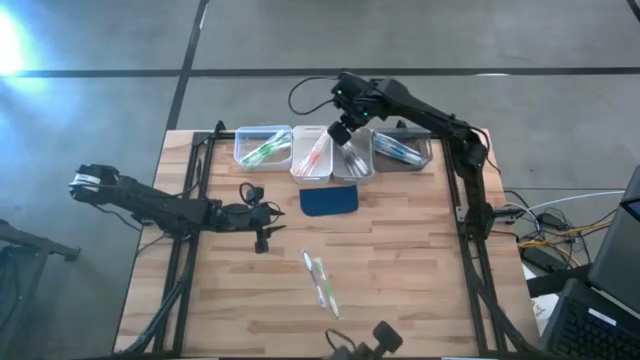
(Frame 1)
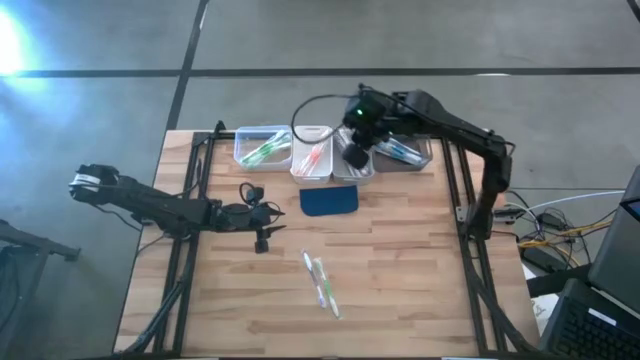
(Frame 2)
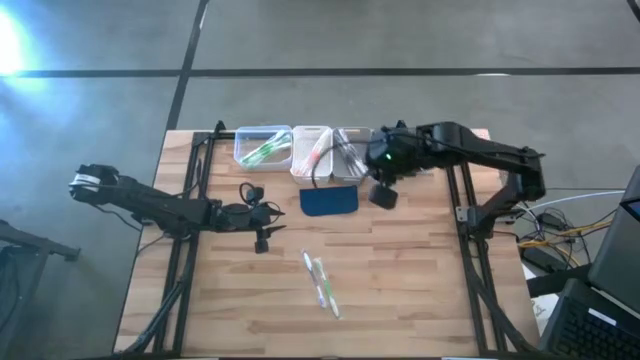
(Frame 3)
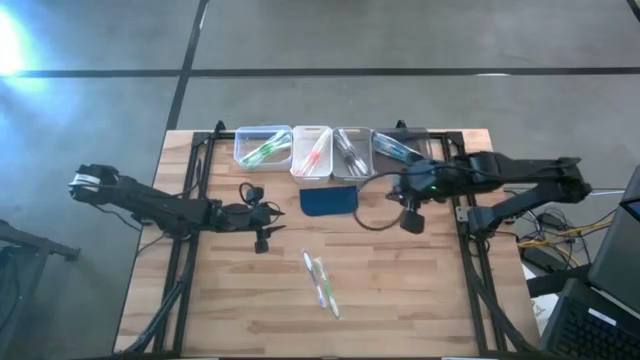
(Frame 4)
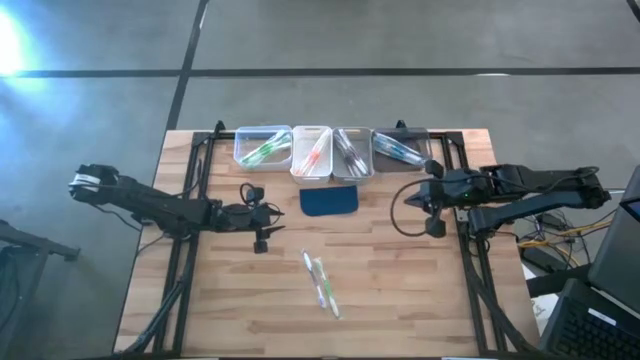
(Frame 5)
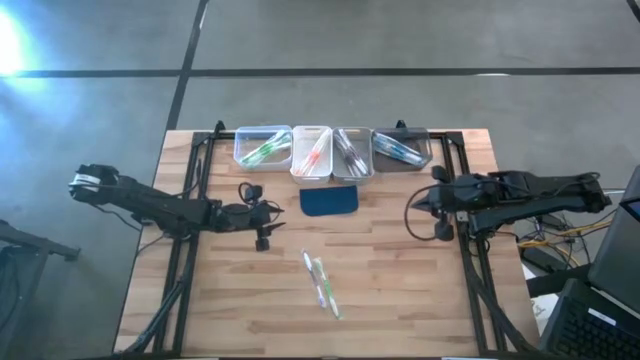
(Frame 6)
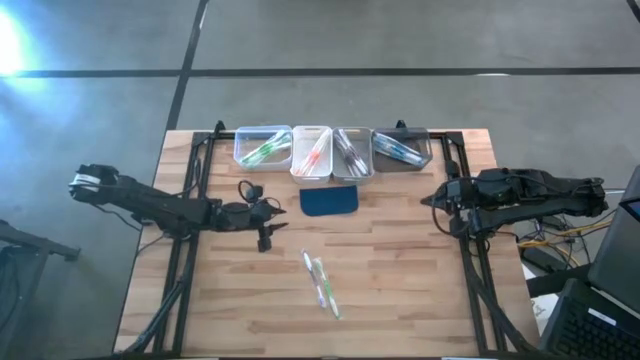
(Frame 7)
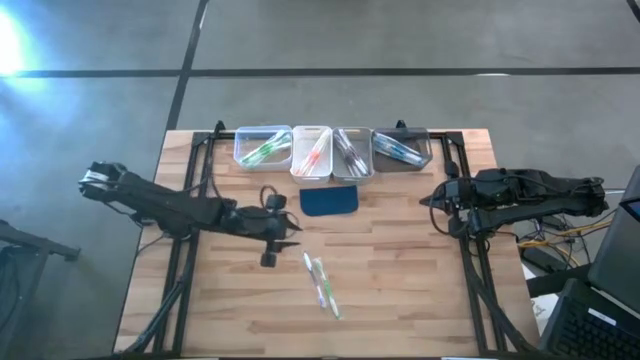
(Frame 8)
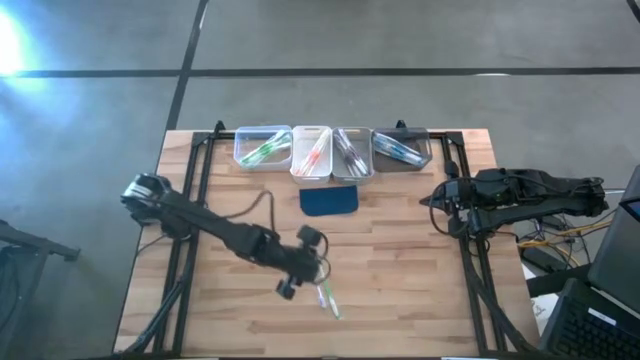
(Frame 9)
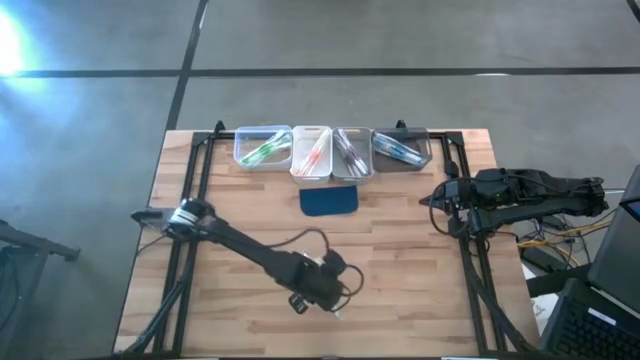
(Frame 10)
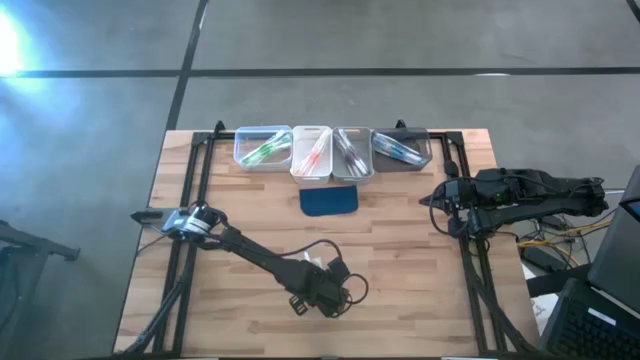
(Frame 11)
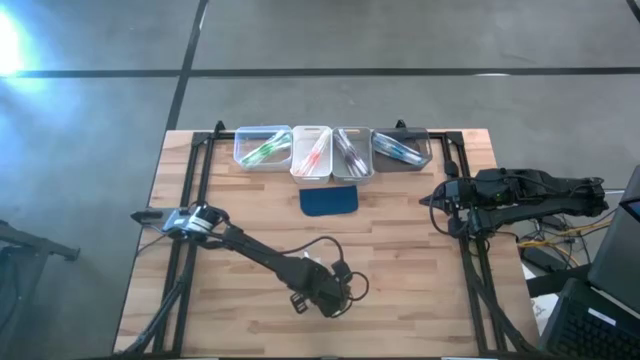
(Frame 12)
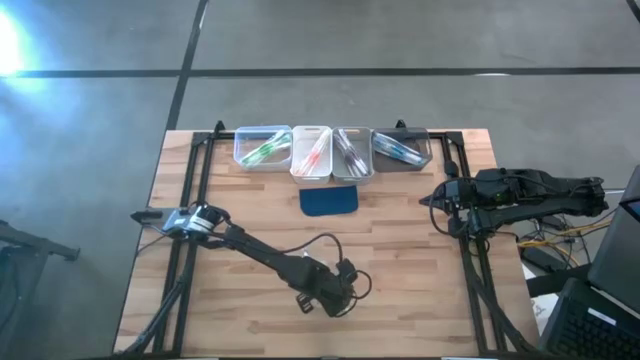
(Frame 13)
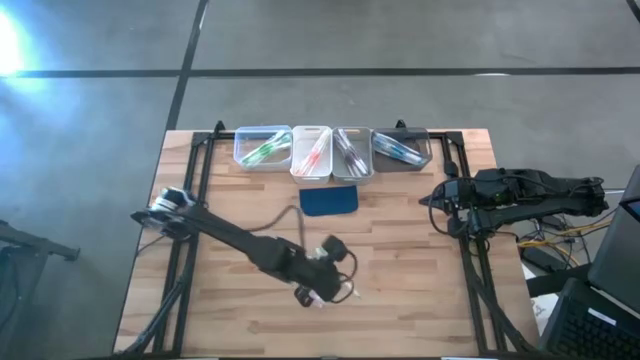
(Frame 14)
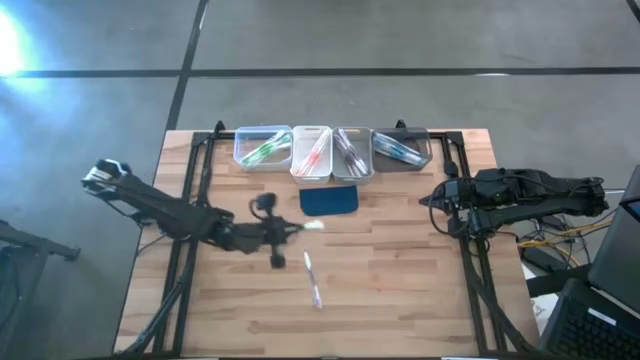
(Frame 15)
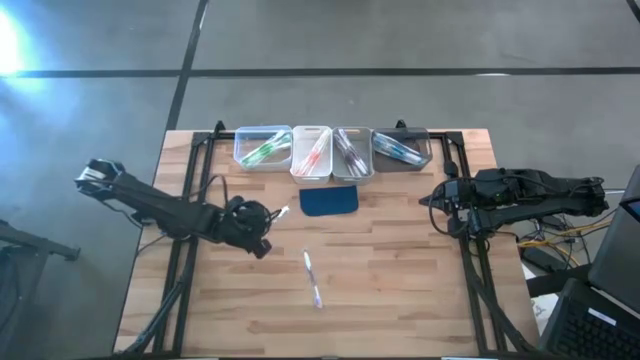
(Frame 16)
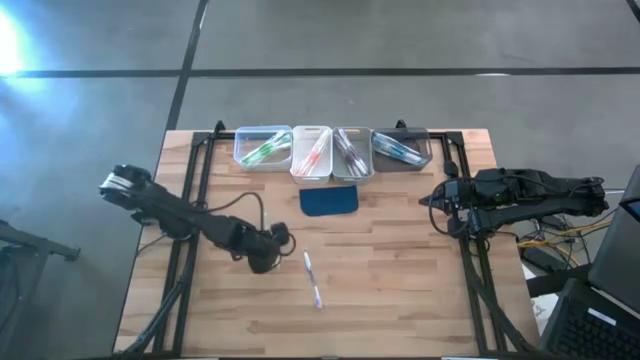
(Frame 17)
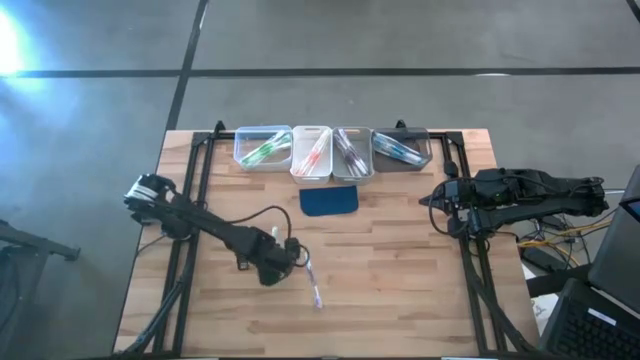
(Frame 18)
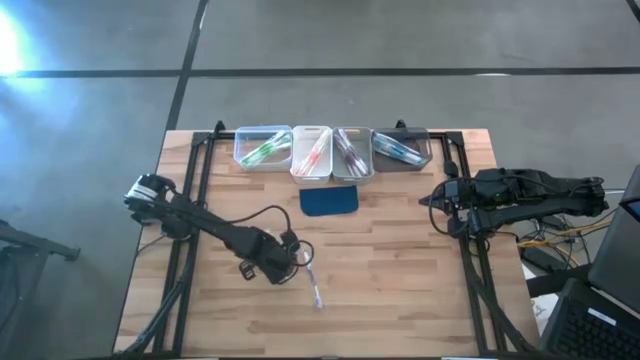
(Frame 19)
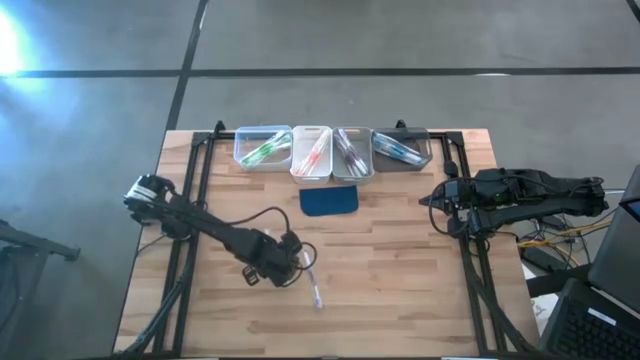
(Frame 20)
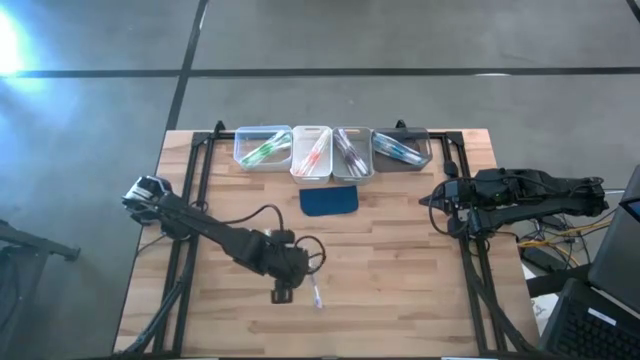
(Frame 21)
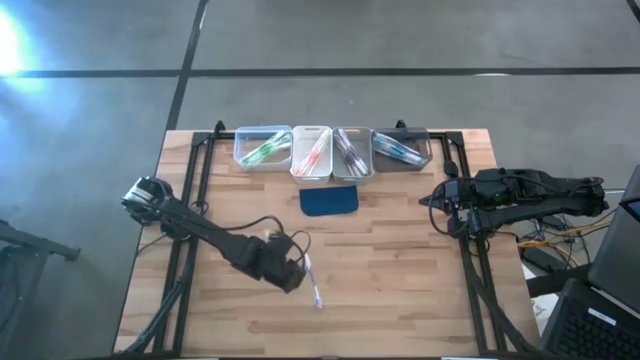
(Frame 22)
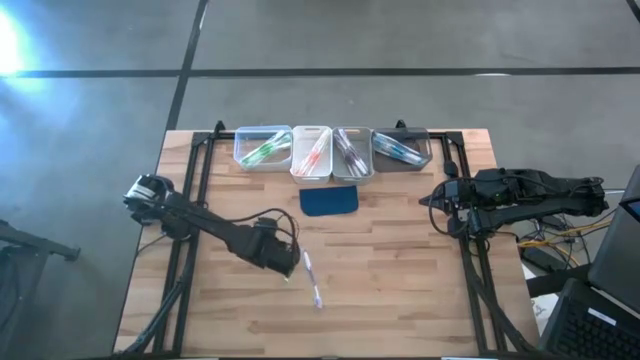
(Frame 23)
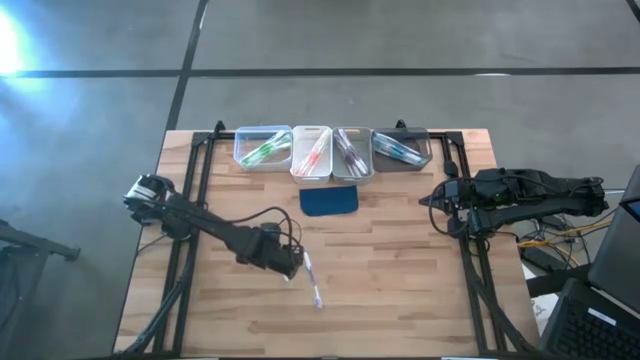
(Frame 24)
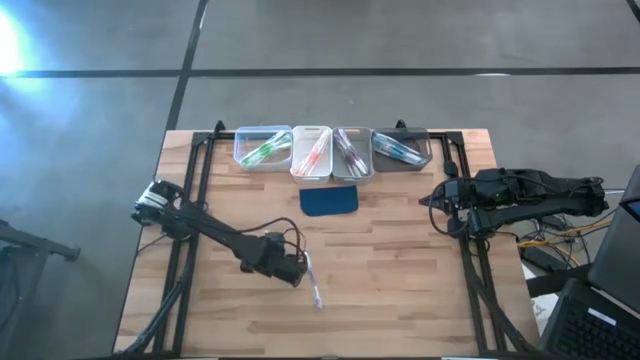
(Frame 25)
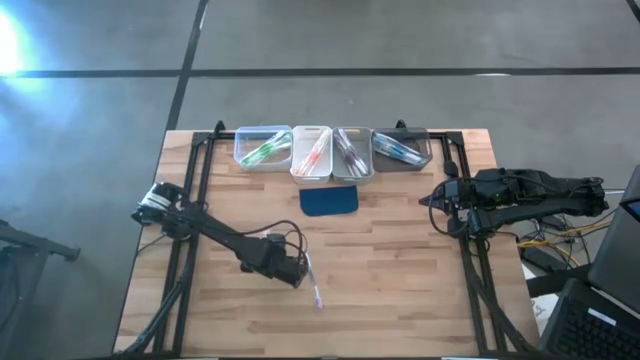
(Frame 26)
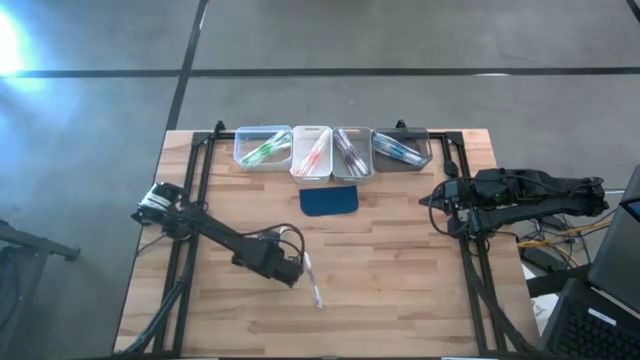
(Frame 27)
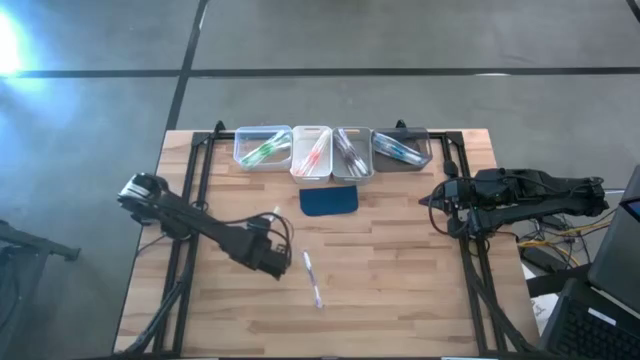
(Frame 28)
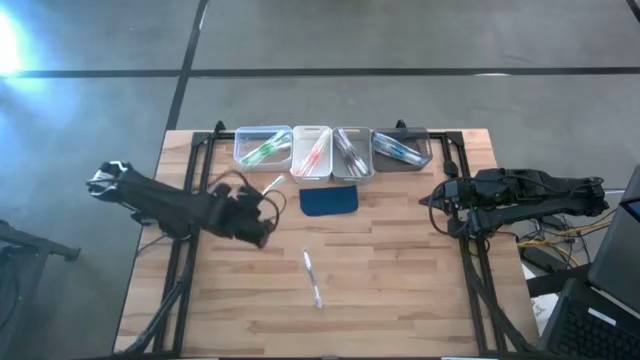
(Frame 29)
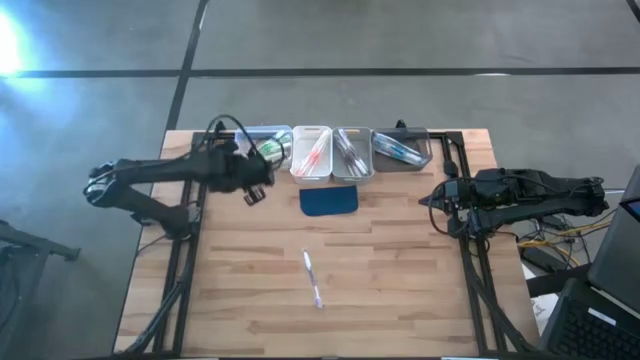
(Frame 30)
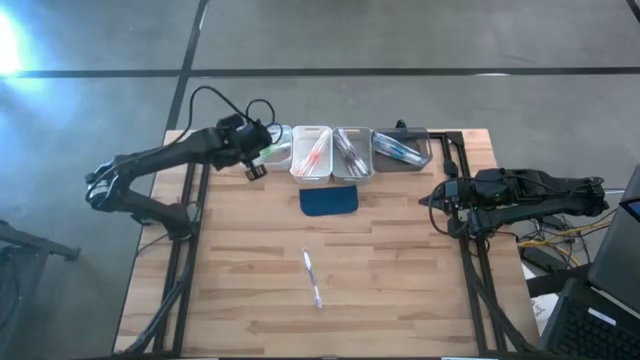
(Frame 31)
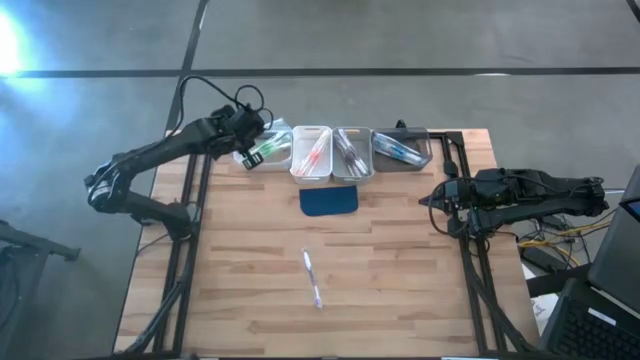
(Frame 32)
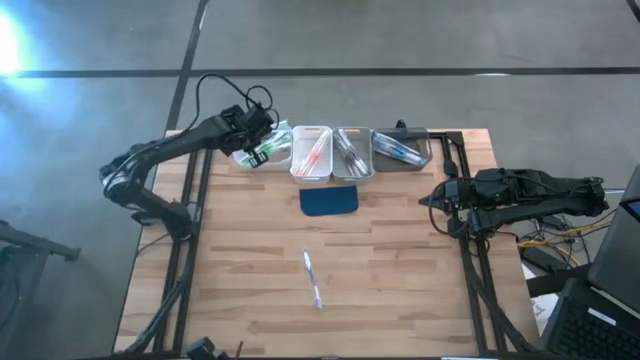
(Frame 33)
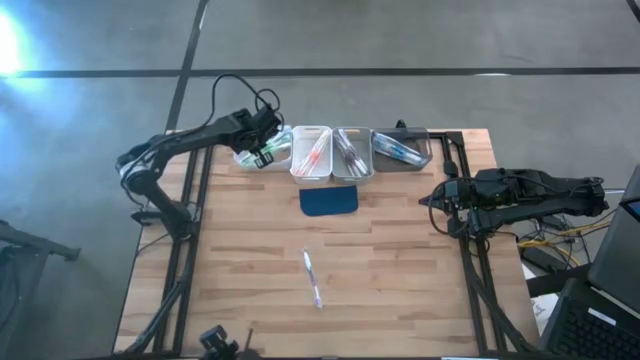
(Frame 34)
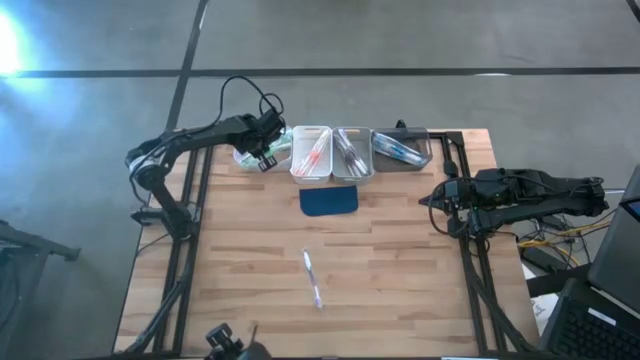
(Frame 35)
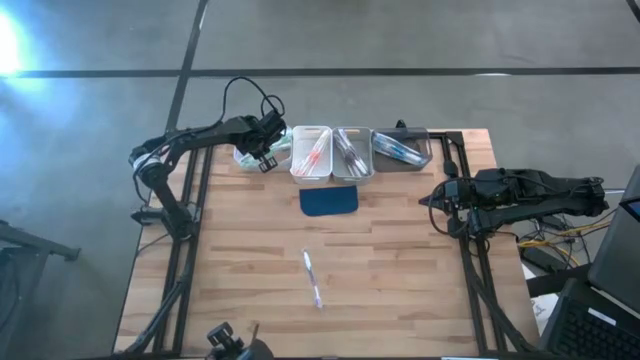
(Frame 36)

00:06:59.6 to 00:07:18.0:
Task: Pick & Place Toothbrushes
Put the green toothbrush into the transparent bin

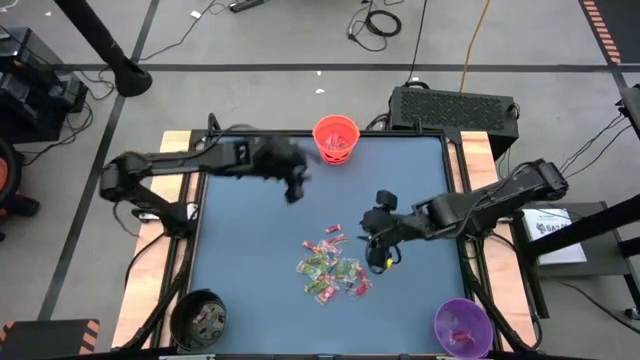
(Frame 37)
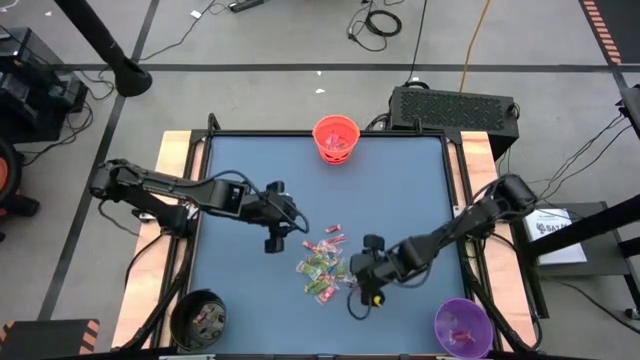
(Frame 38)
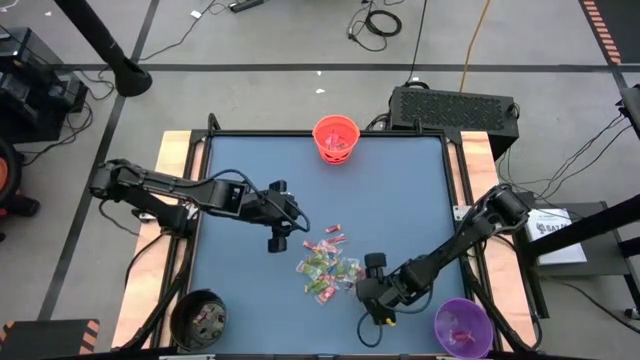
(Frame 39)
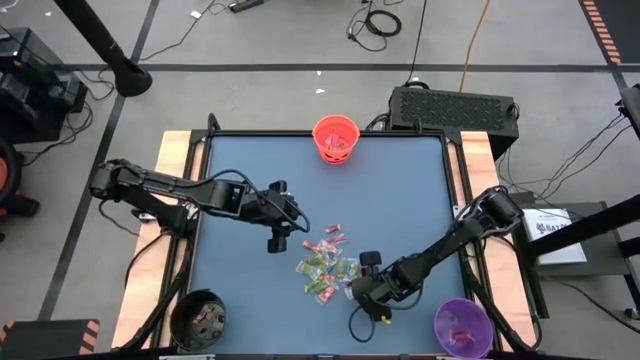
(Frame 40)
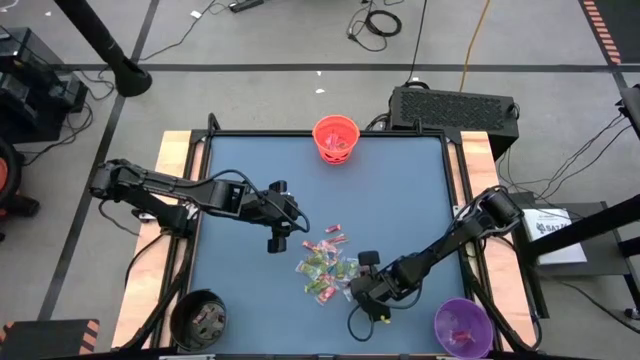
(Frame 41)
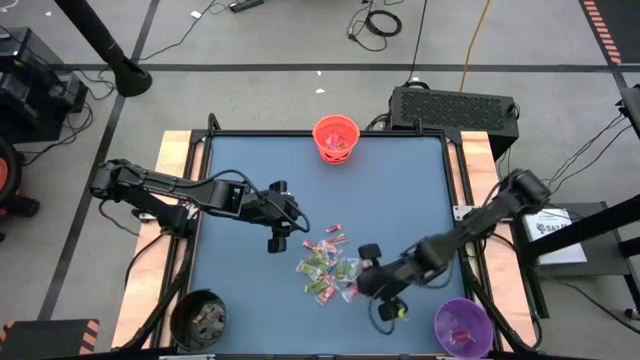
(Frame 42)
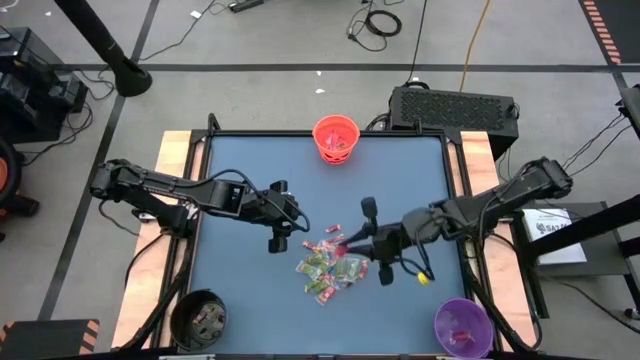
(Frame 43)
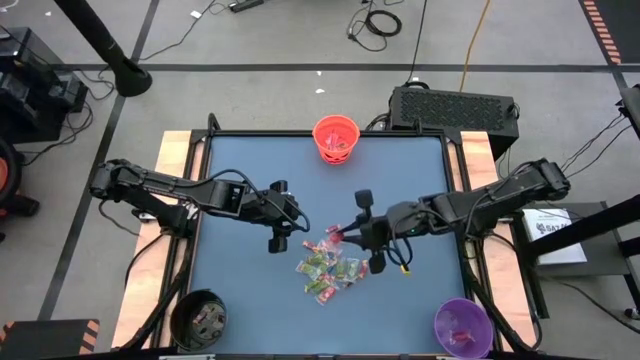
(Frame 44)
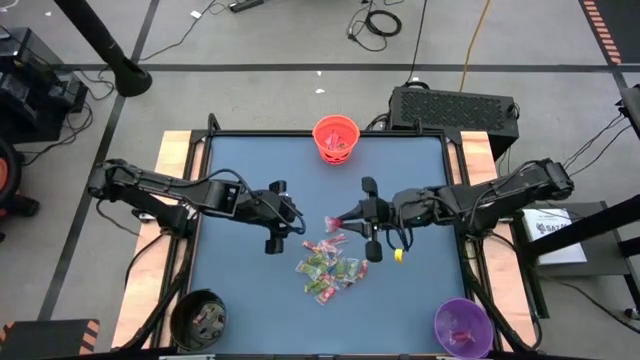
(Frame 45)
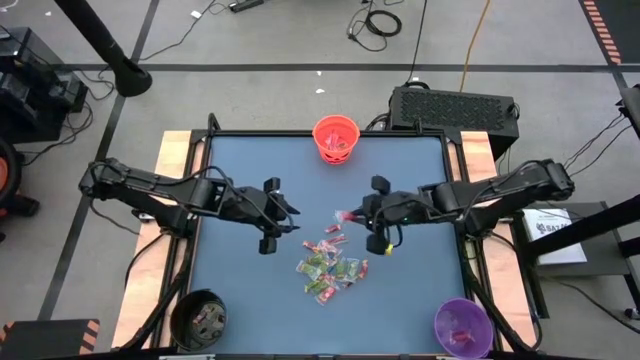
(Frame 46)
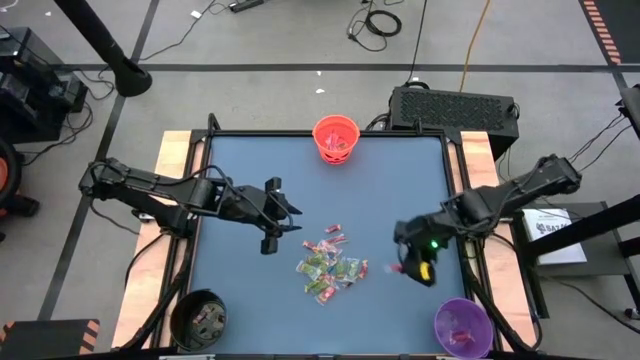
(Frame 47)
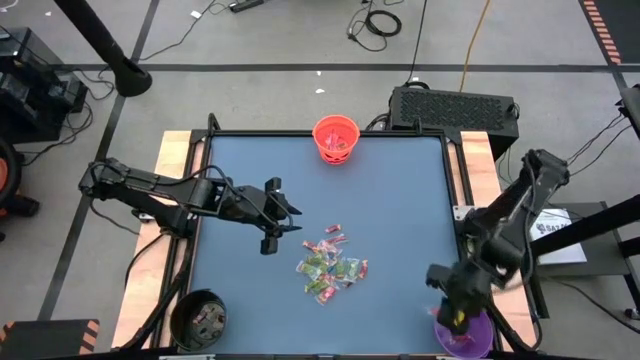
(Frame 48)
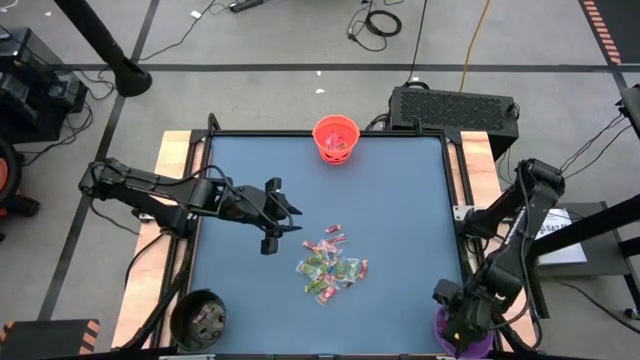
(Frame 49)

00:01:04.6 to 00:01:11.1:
Task: Sort candy by brand, put in halloween buckets
Put the small orange gummy into the purple bucket
